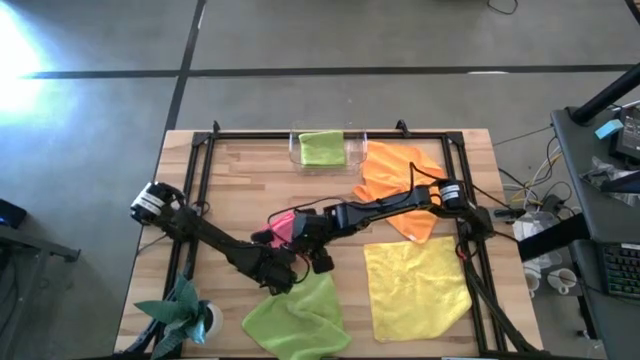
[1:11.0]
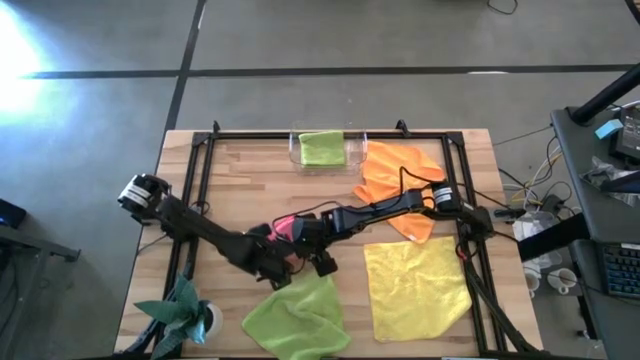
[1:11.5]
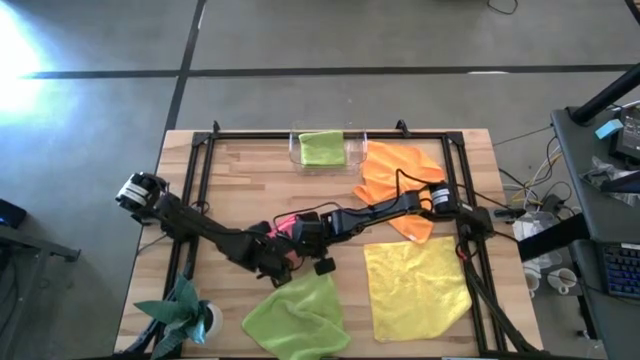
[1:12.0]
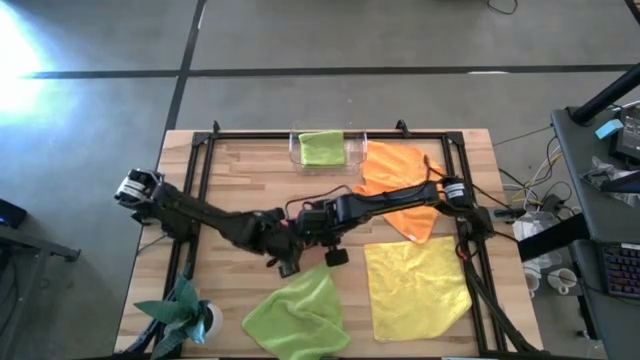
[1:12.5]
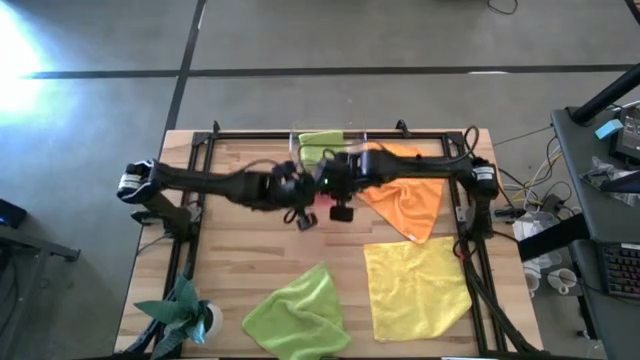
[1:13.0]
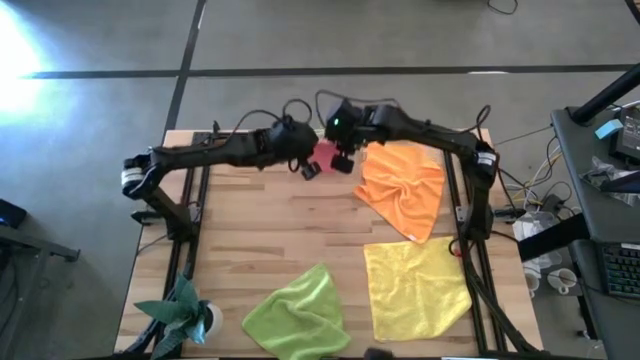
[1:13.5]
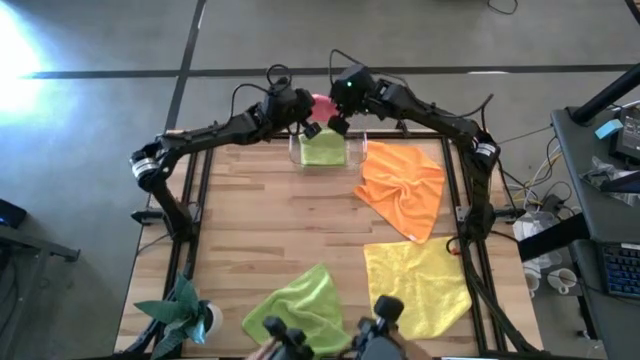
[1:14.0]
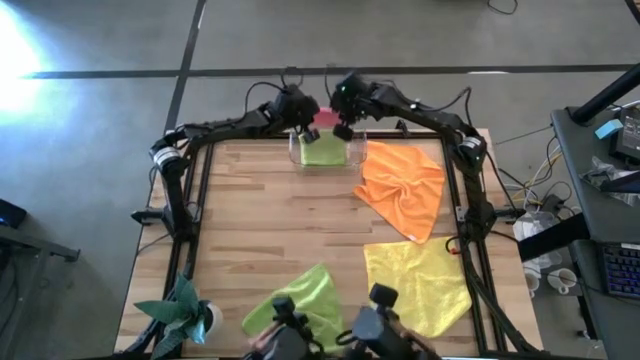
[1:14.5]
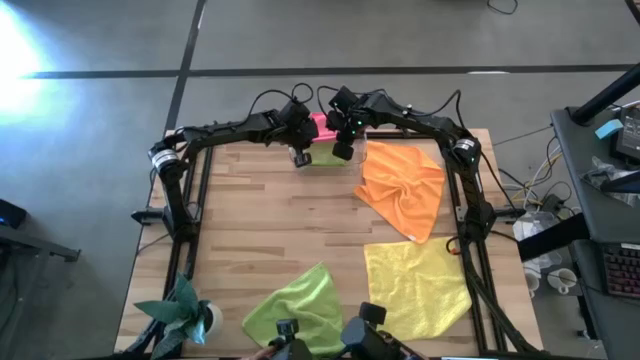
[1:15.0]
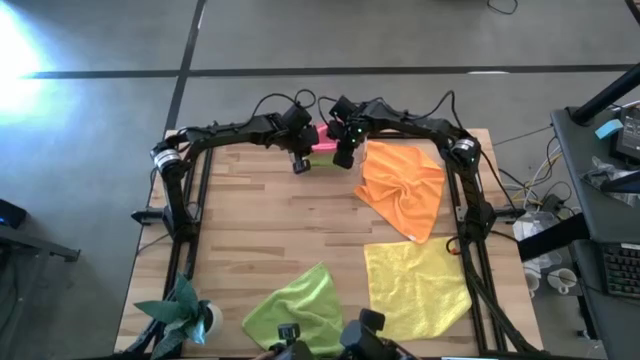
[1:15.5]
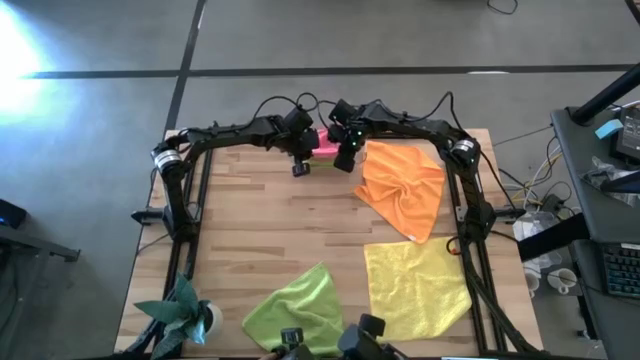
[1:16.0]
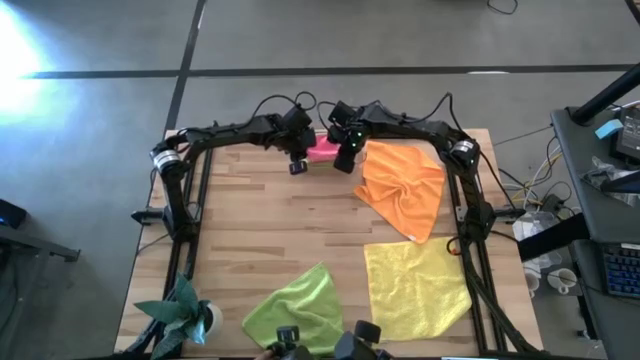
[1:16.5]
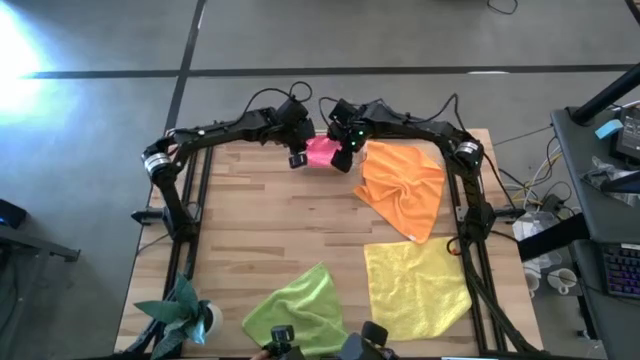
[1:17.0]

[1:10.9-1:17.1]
Task: Fold microfiber towels
Put the pink microfiber towel into the transparent bin
